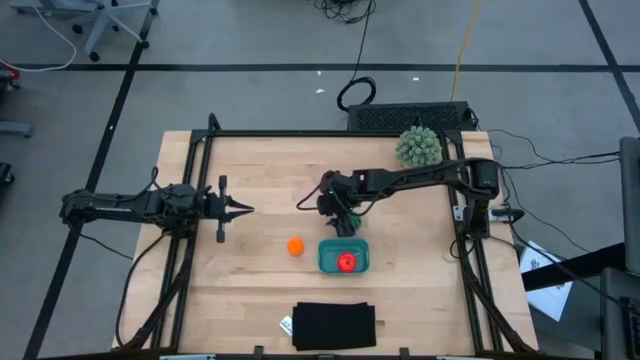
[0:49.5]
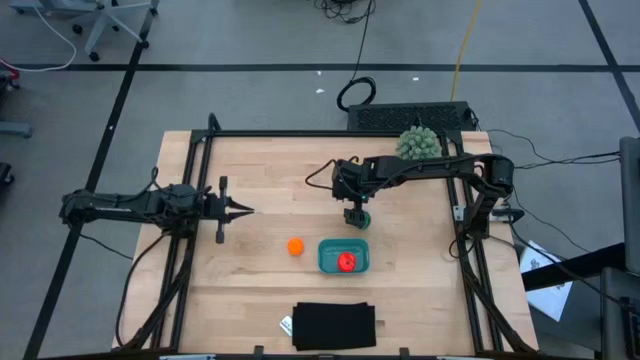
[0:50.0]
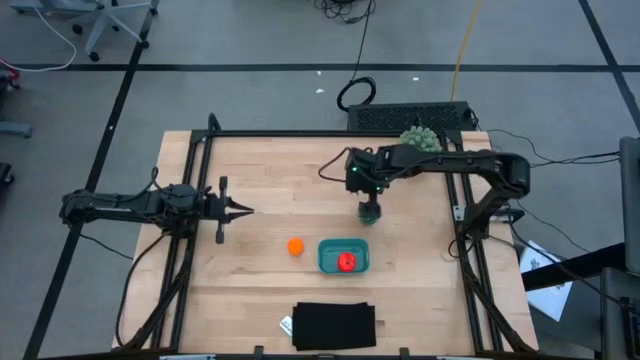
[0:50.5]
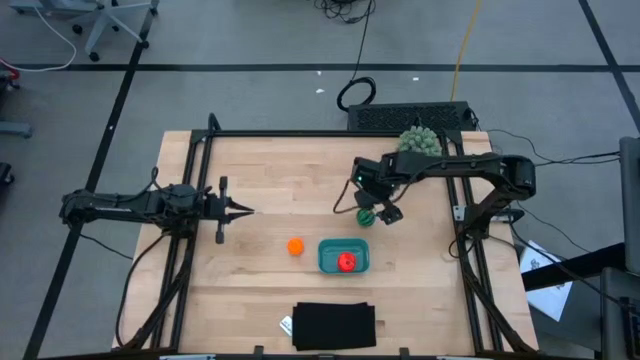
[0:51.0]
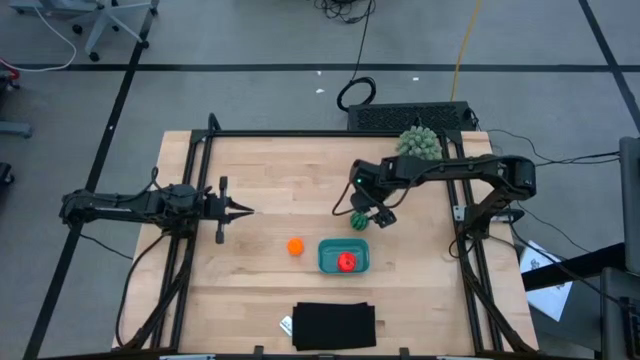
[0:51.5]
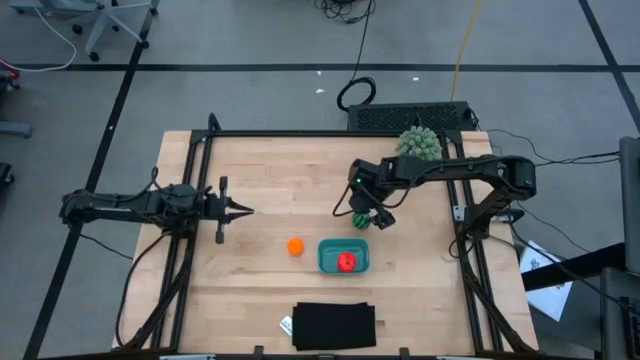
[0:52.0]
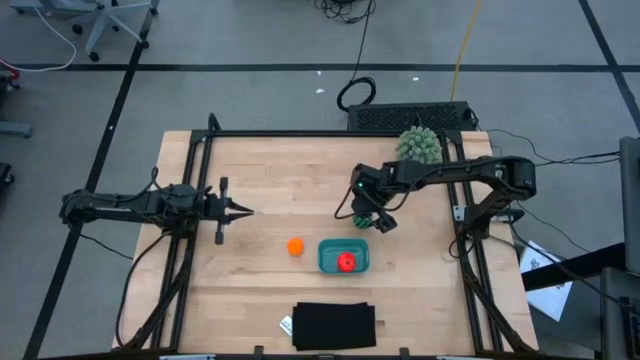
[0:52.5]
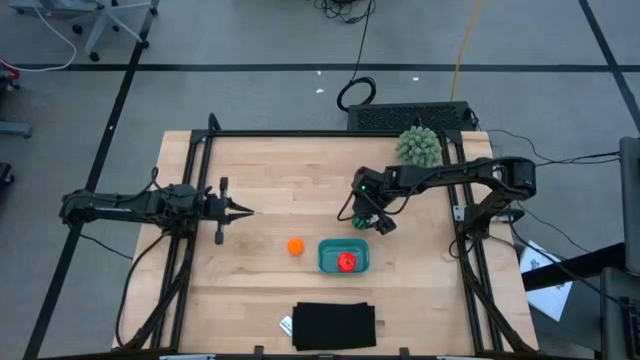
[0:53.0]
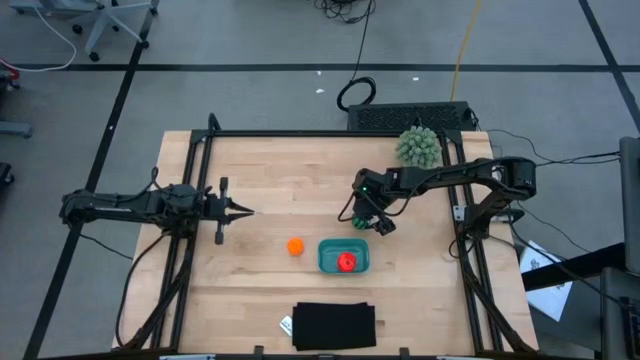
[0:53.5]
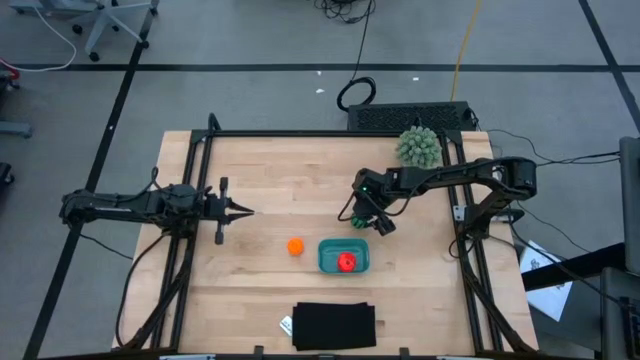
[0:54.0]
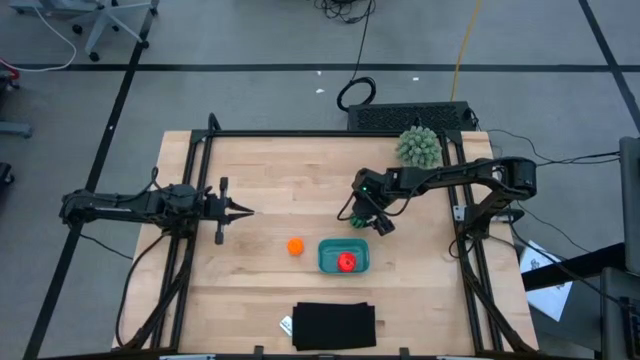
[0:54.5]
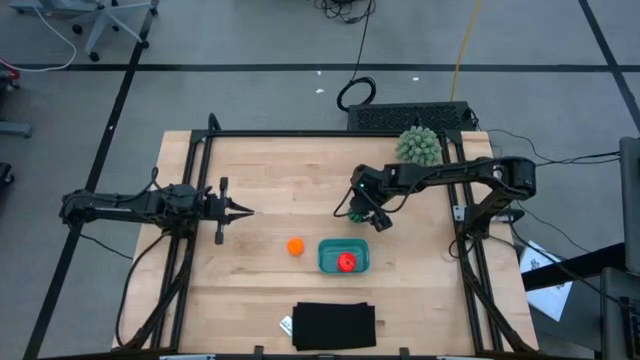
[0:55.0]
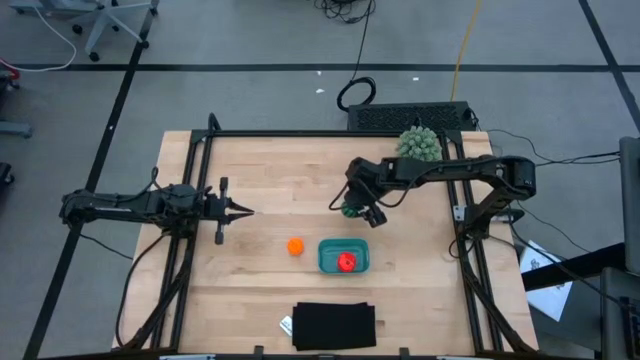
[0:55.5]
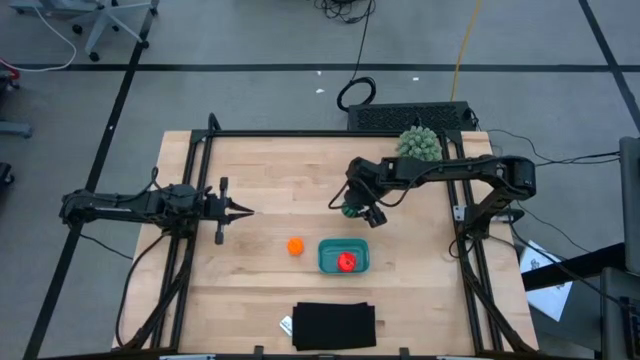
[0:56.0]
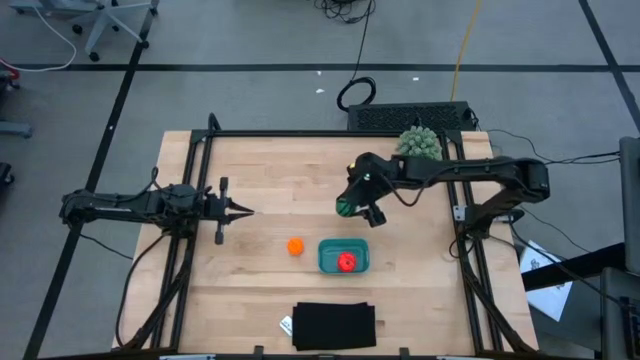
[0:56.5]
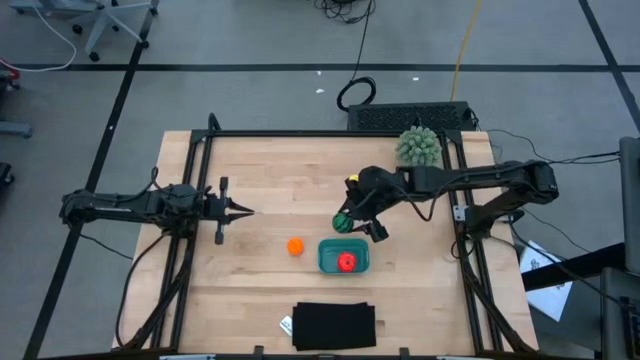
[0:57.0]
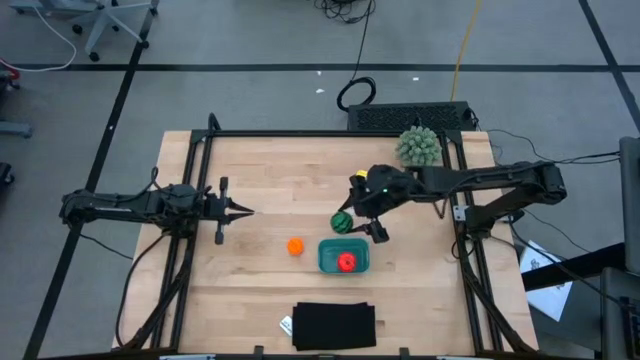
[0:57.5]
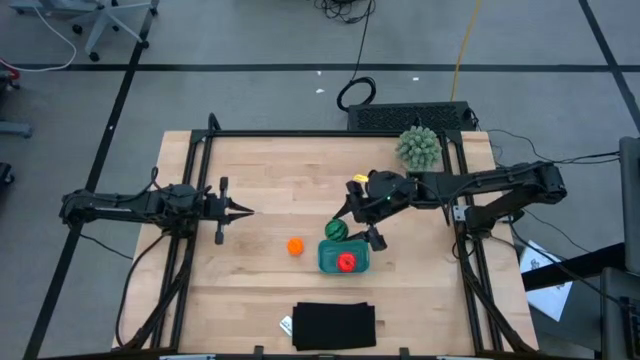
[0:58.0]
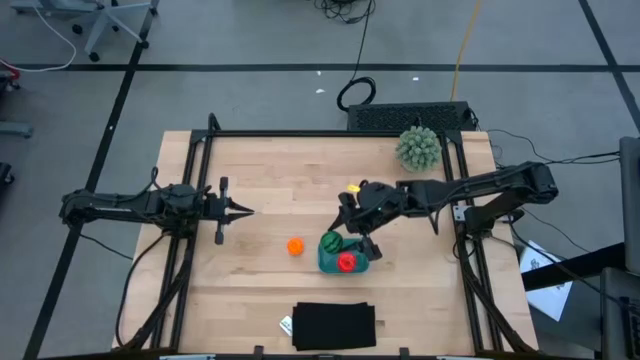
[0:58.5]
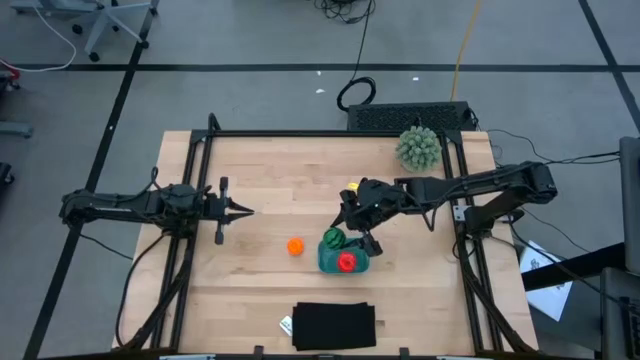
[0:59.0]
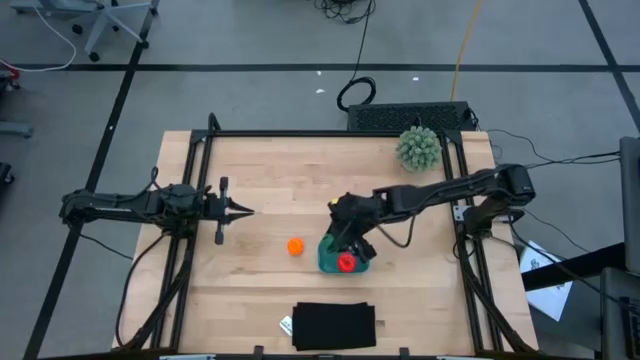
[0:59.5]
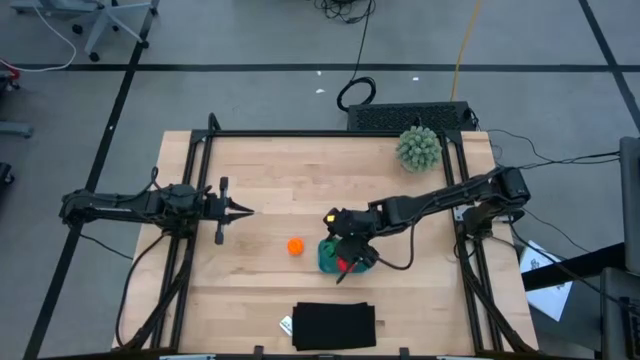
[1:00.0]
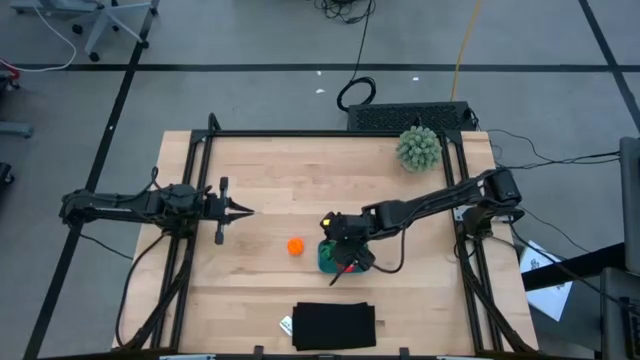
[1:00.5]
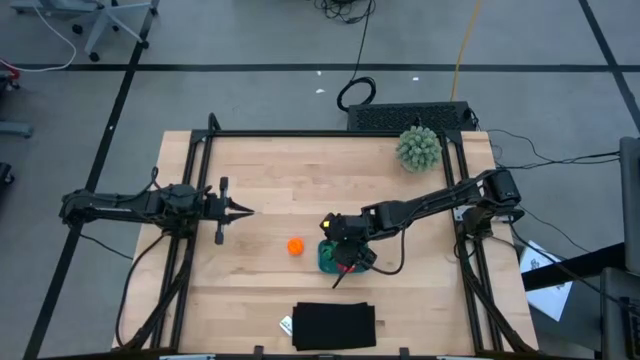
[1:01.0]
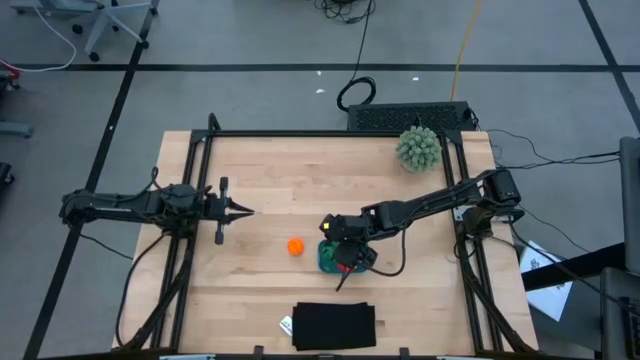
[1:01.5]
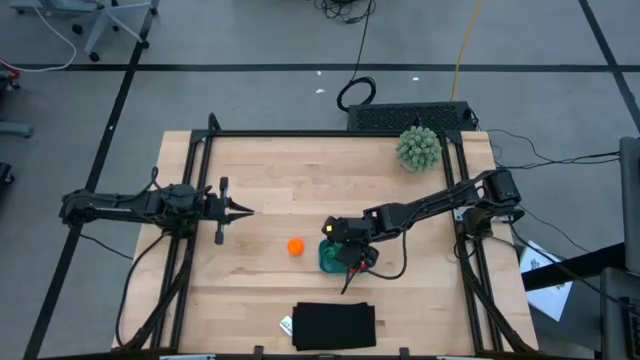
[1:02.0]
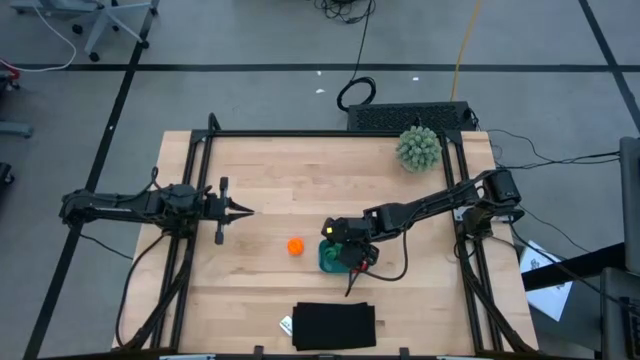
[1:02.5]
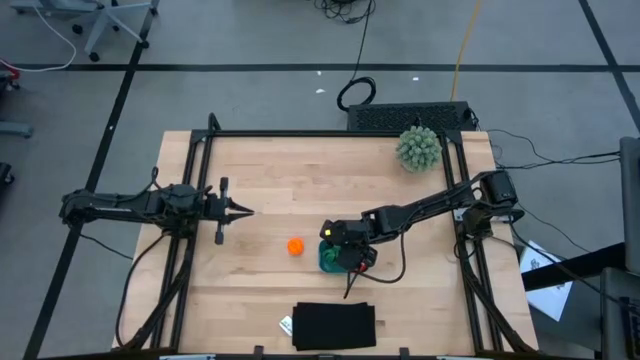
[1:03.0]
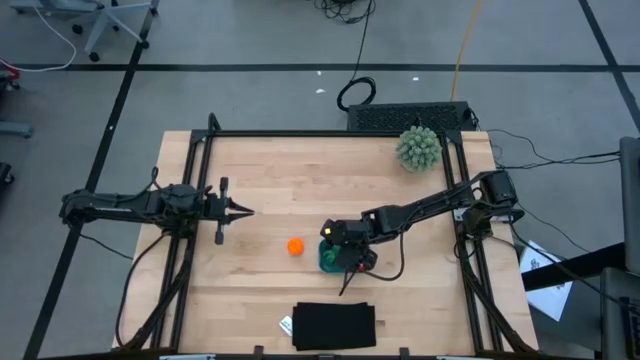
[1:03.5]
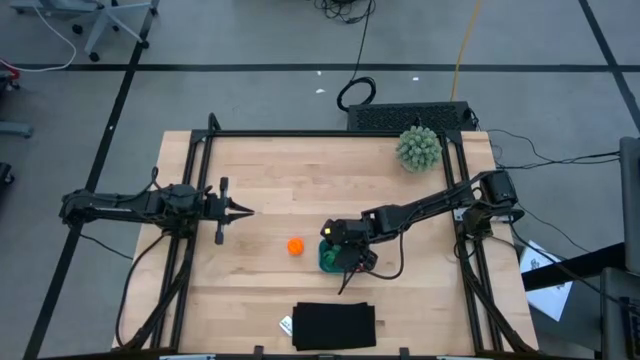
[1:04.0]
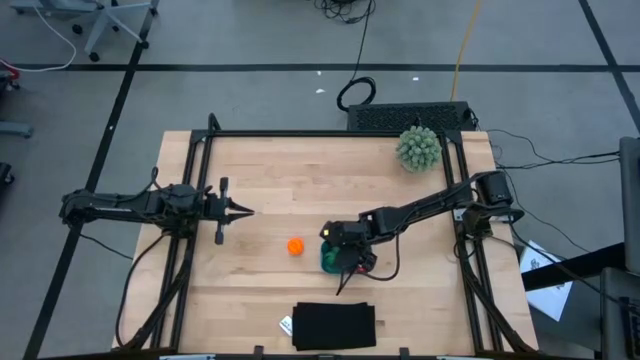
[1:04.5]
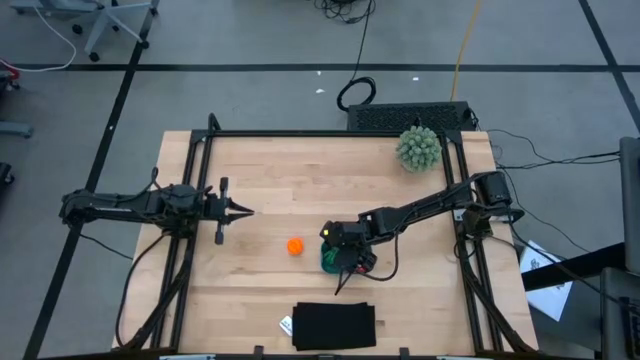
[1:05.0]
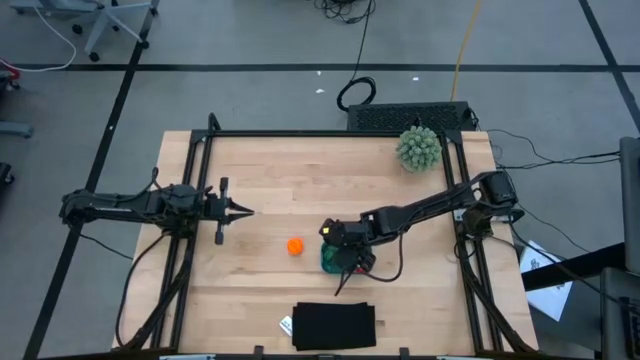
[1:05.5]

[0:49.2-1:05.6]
Task: Pick and placing Produce into tupperware
Put the watermelon into the blue bin
